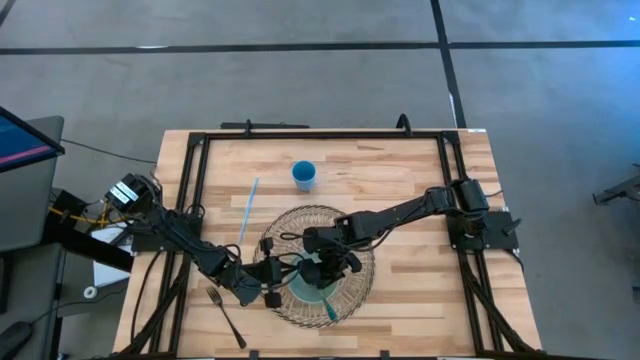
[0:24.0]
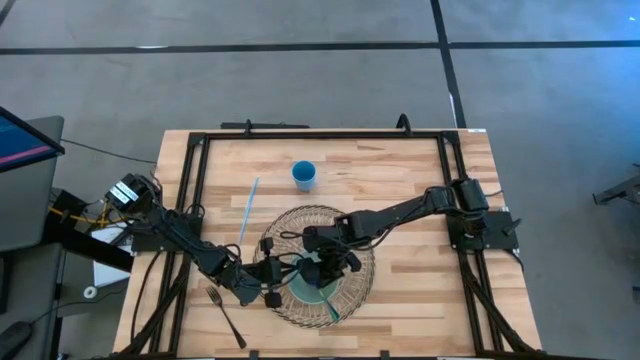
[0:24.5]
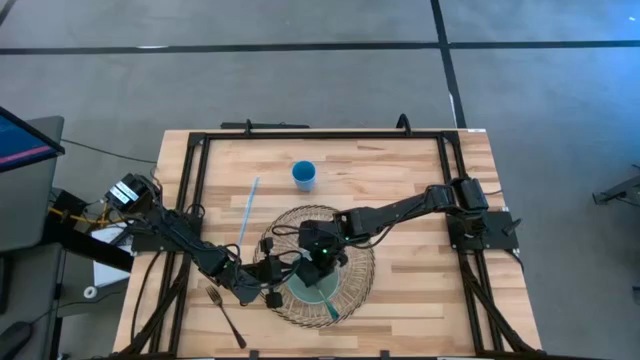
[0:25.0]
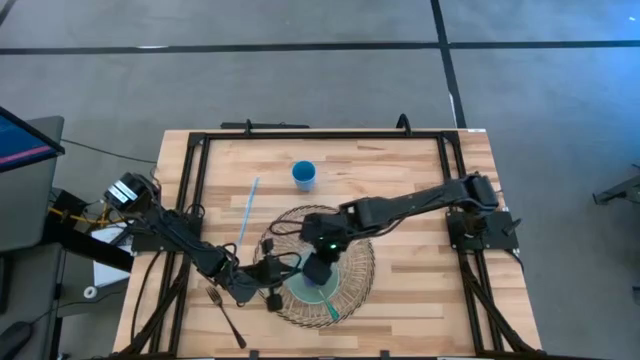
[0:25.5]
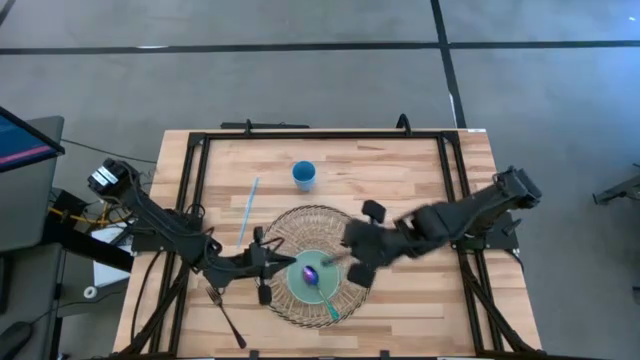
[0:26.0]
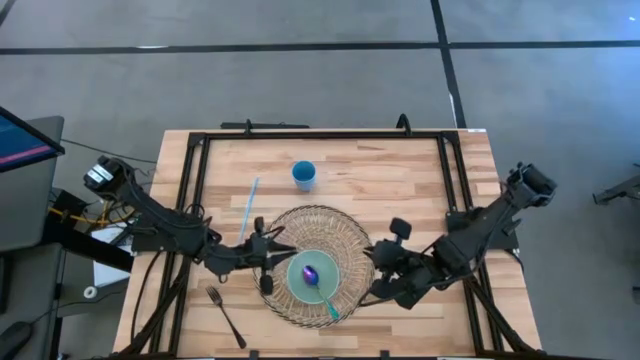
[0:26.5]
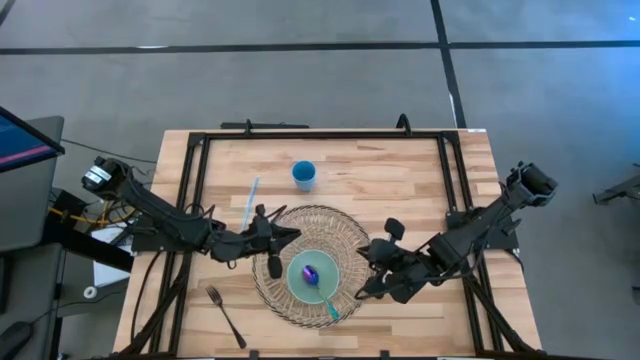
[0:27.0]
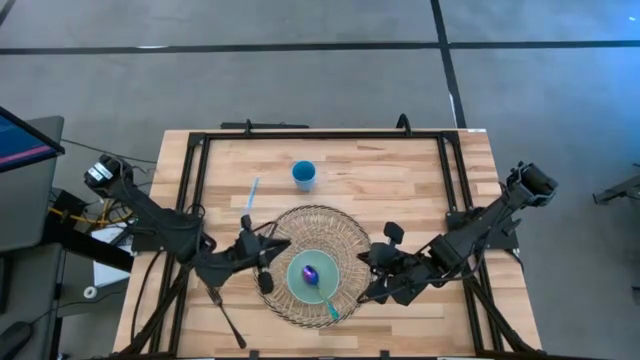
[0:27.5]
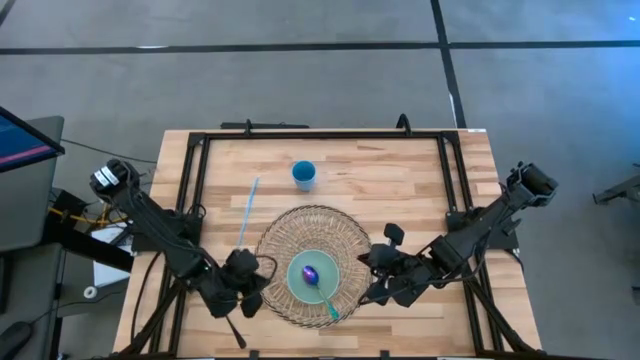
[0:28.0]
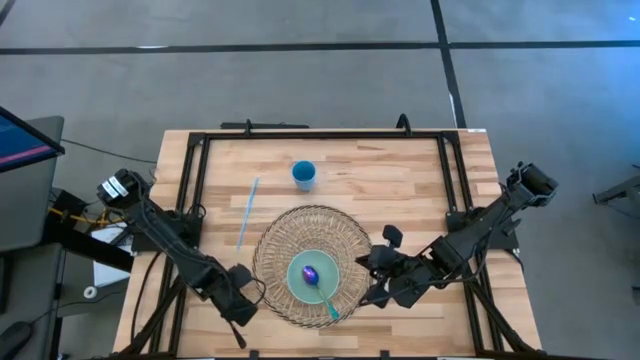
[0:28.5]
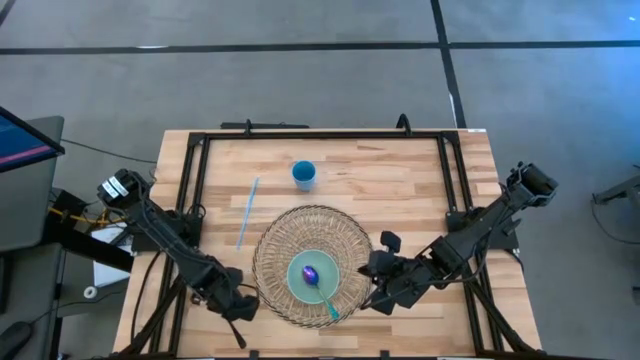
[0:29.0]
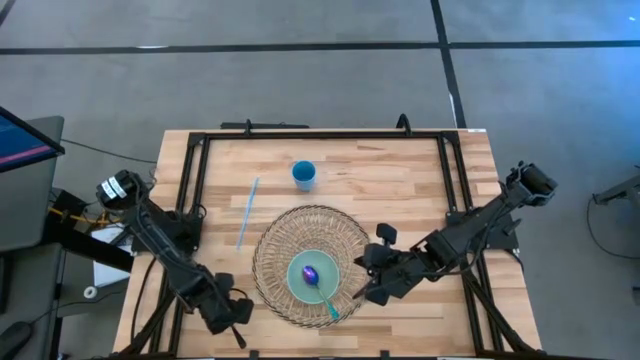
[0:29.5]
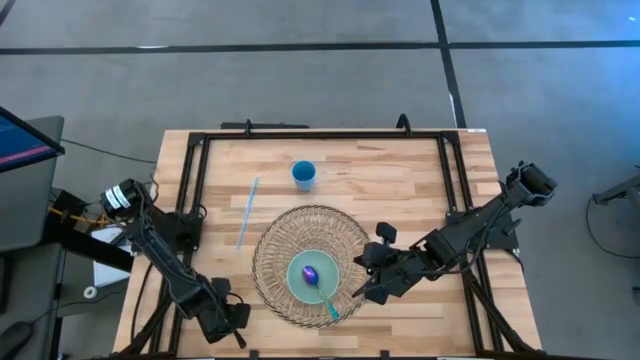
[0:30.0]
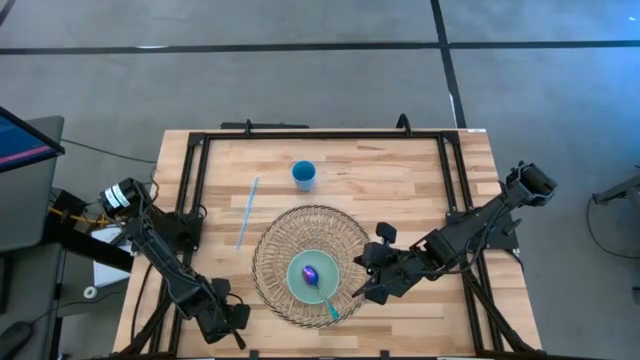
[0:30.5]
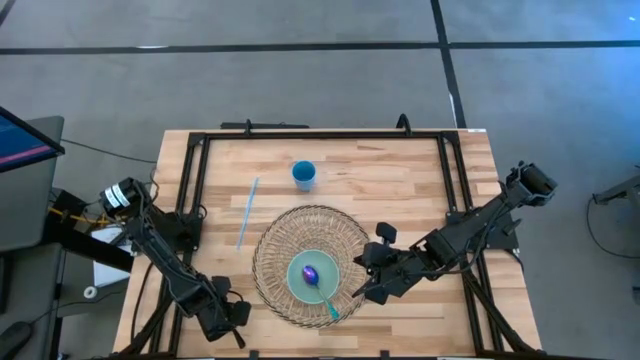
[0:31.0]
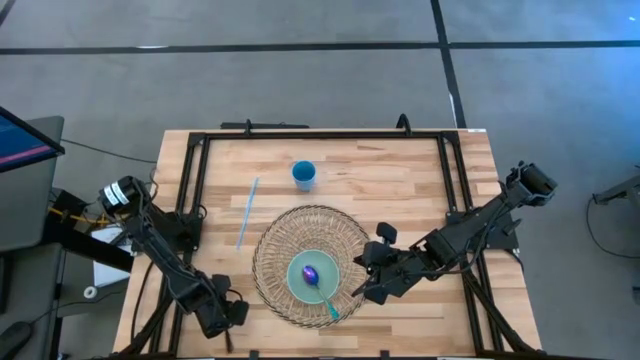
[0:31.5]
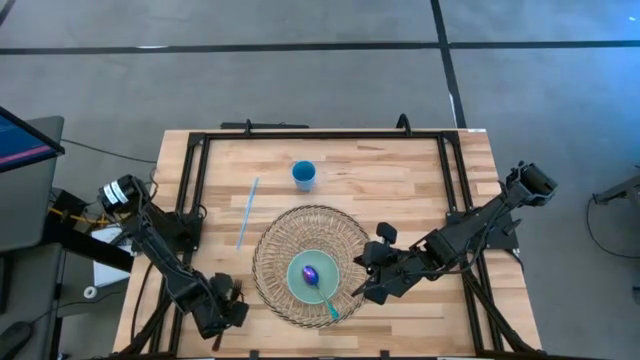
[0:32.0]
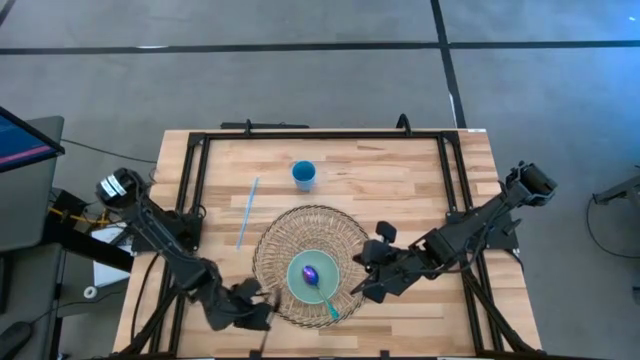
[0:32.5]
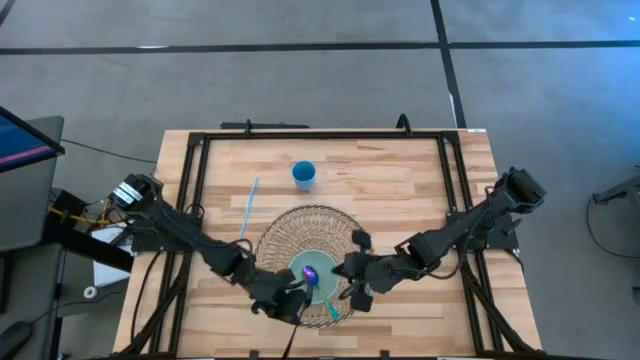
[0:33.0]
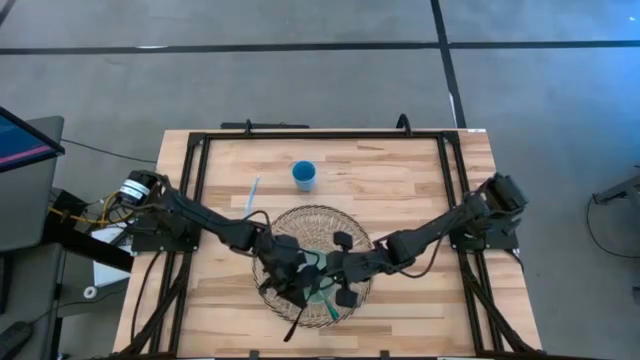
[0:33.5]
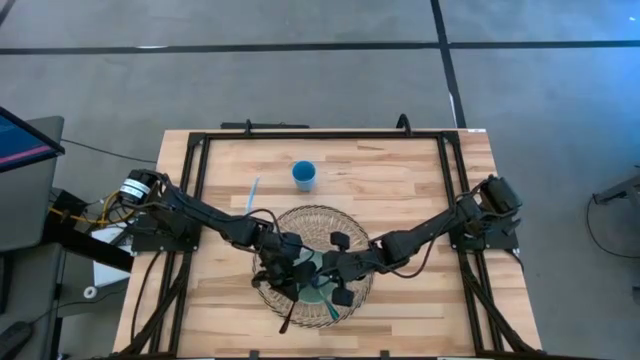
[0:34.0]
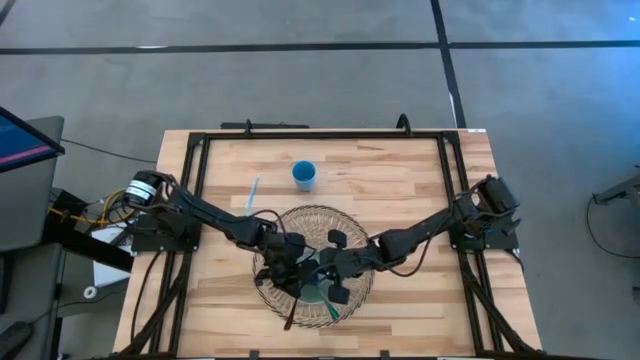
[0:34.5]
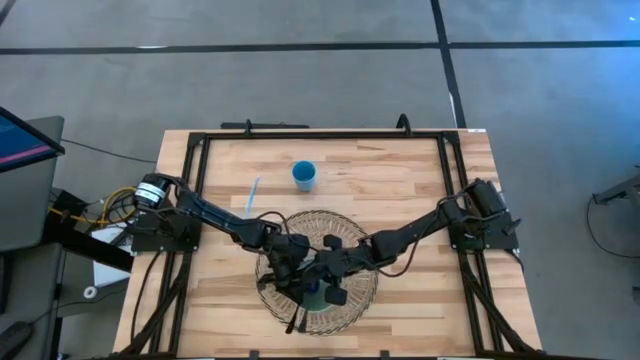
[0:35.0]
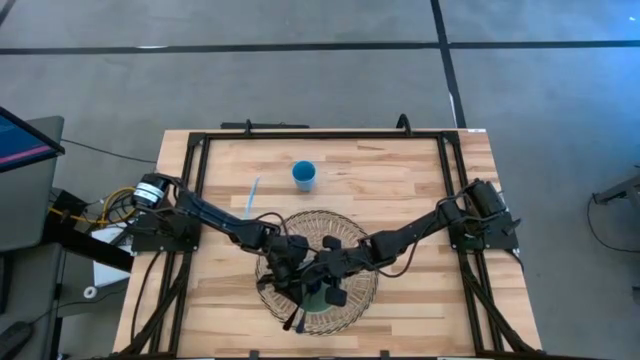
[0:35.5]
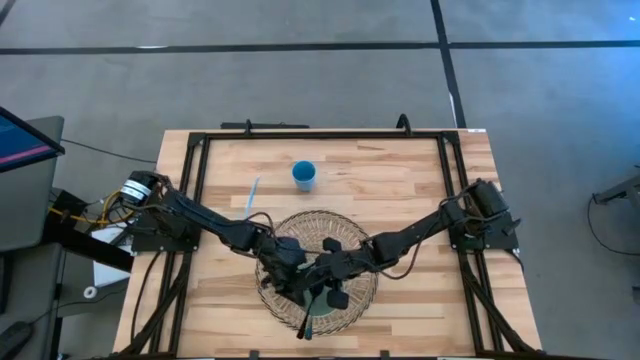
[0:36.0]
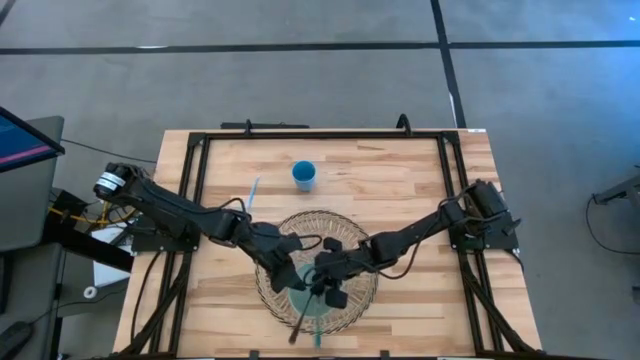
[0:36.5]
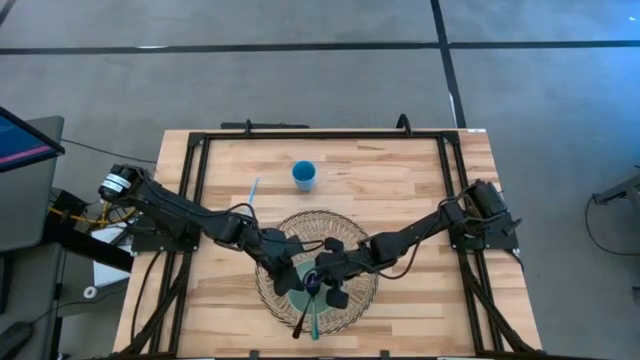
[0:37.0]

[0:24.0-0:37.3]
Task: Pick & Place Utensil
Put the black fork into the green bowl on the brown placemat

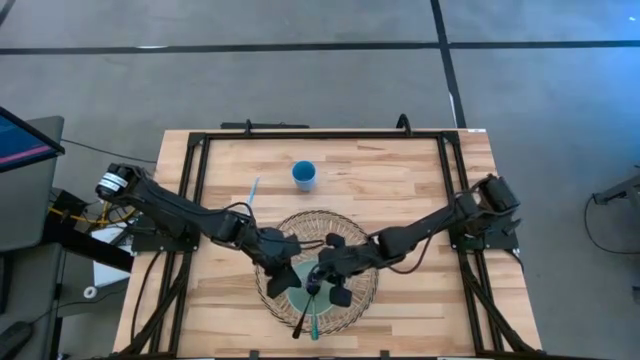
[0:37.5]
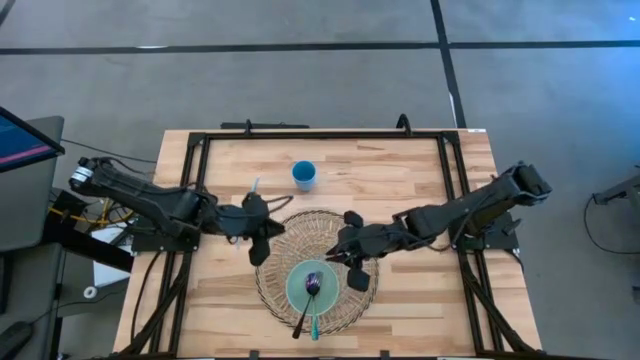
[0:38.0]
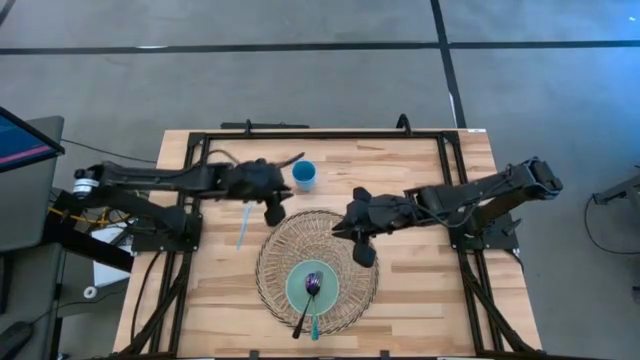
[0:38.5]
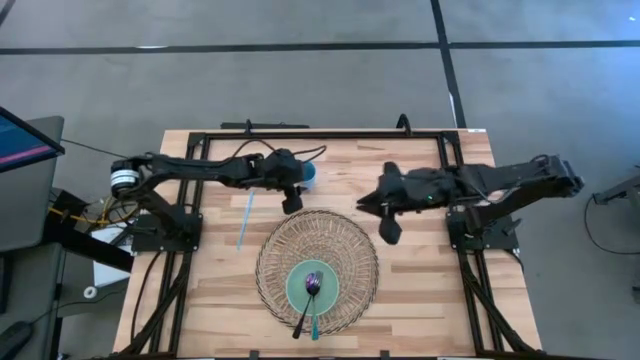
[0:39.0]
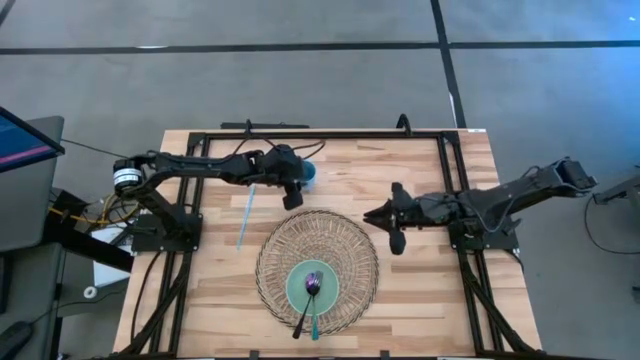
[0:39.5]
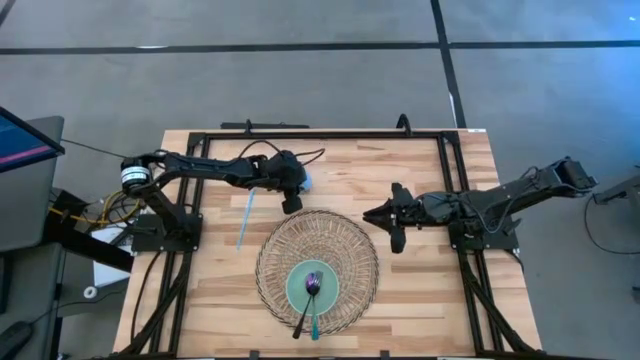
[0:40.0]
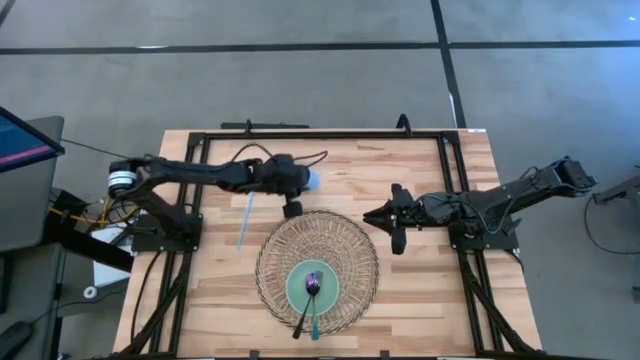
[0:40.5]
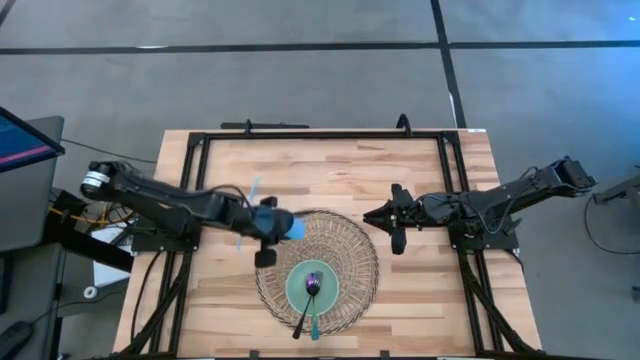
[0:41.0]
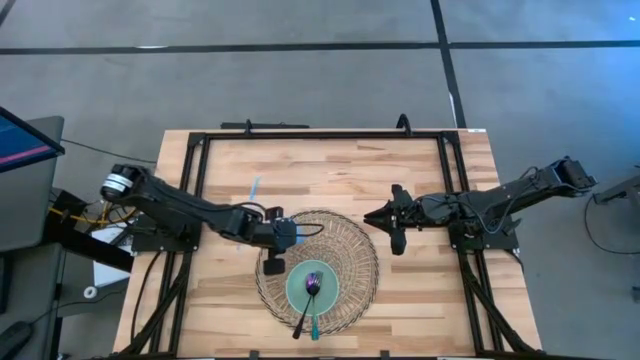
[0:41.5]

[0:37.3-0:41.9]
Put the blue cup on the brown placemat to the top left of the green bowl

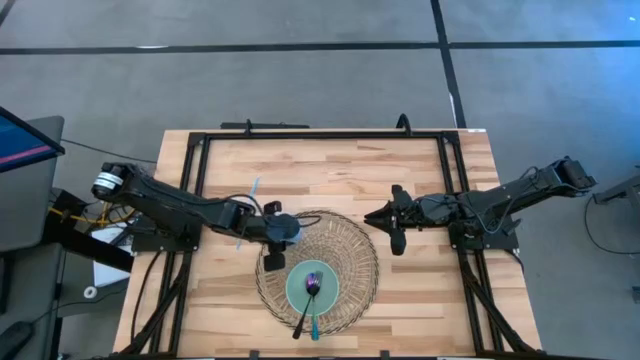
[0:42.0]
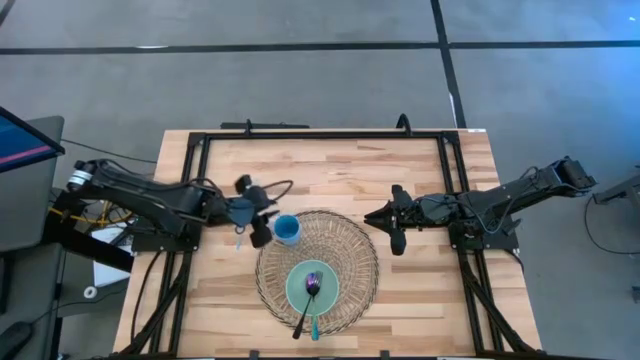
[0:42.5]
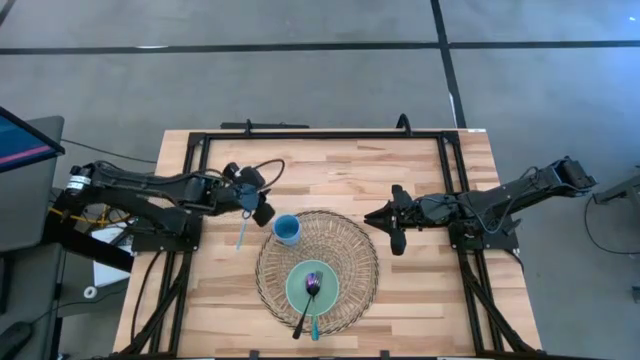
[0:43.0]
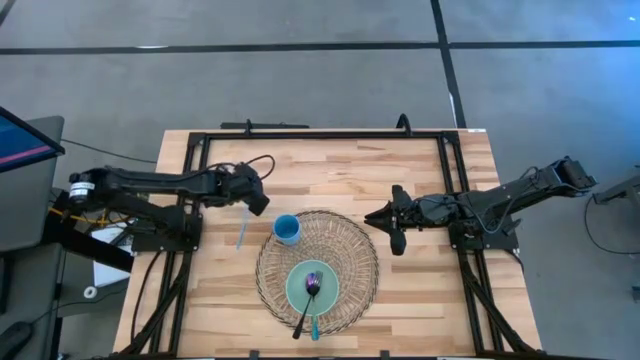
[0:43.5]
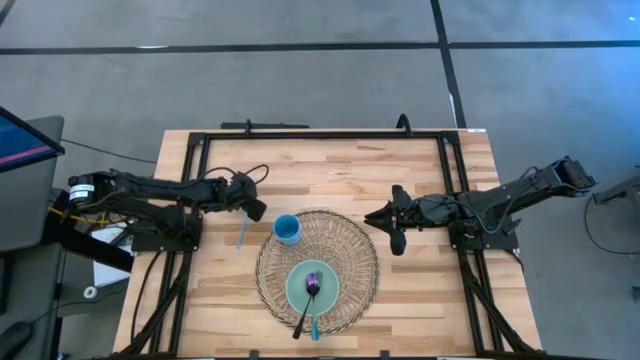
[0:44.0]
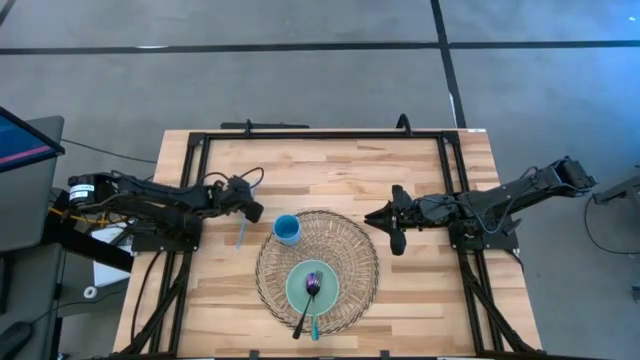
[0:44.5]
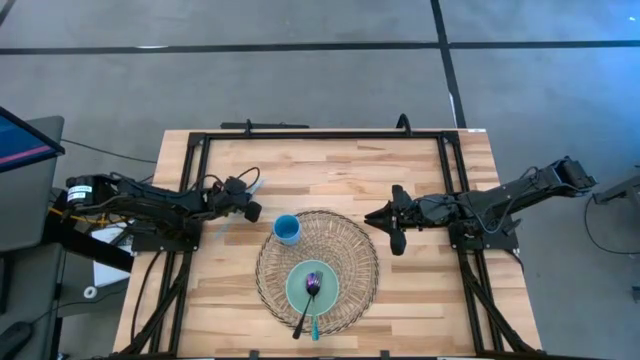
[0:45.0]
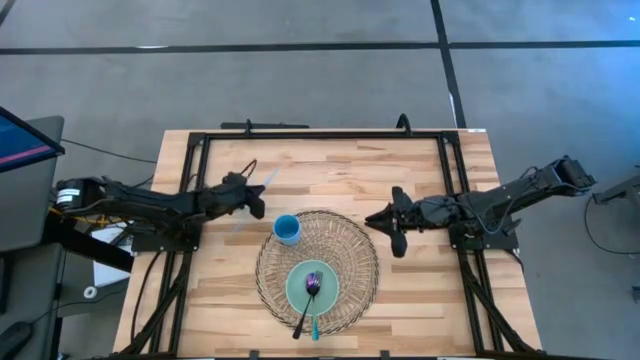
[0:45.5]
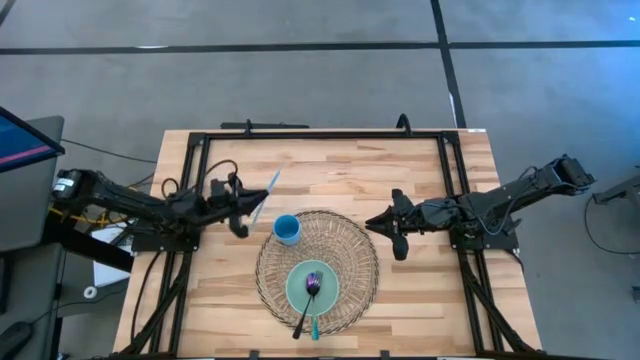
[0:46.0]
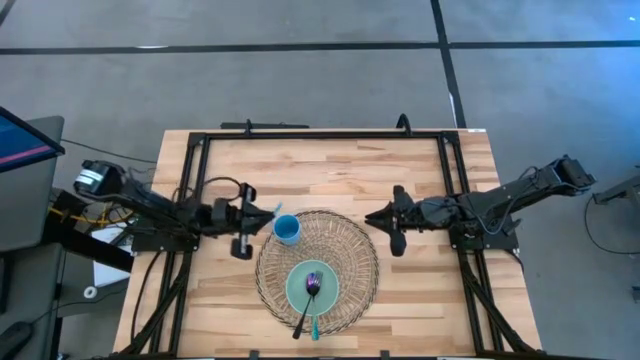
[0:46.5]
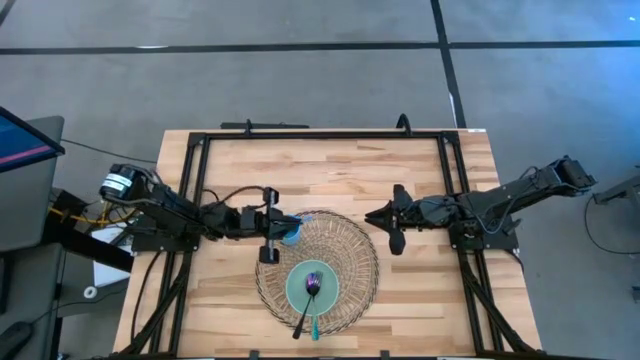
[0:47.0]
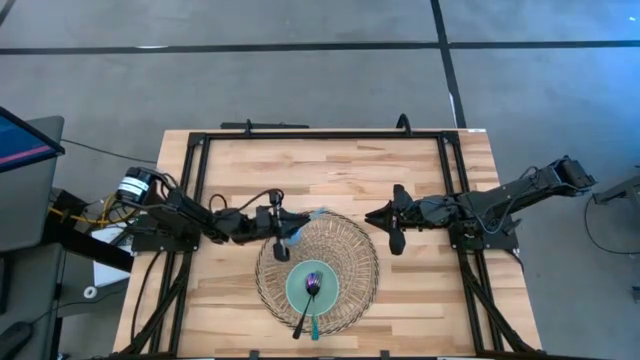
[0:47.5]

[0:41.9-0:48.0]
Put the blue straw into the blue cup on the brown placemat
